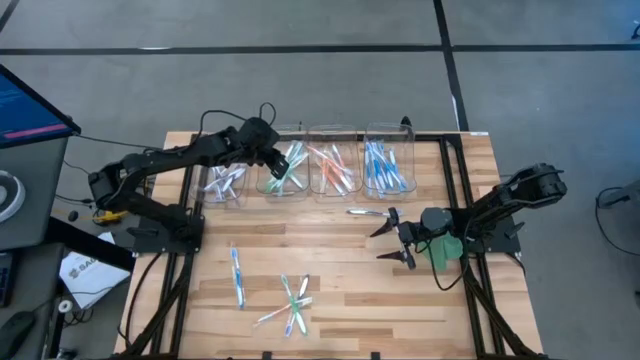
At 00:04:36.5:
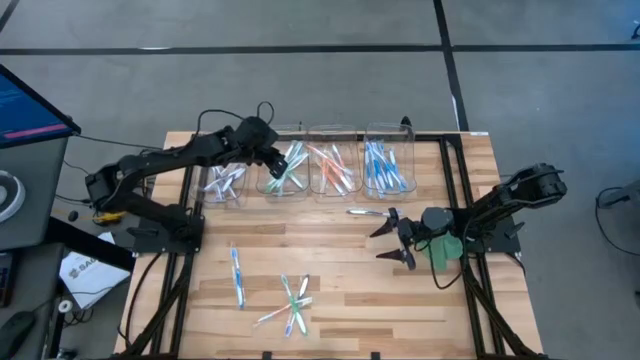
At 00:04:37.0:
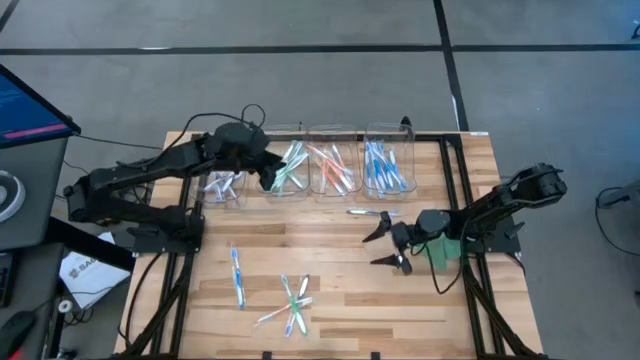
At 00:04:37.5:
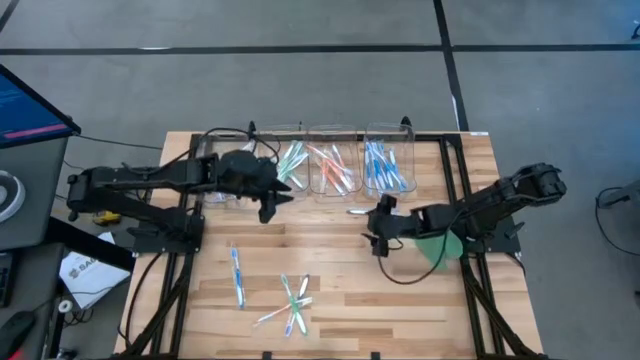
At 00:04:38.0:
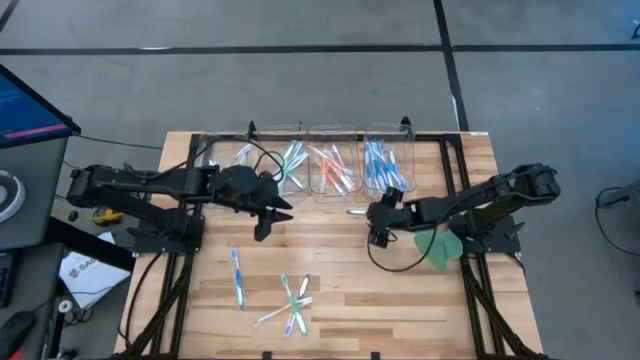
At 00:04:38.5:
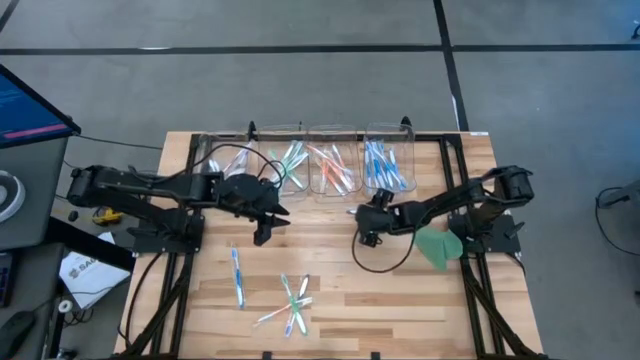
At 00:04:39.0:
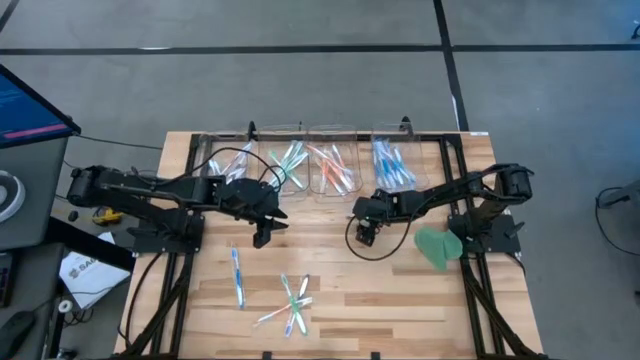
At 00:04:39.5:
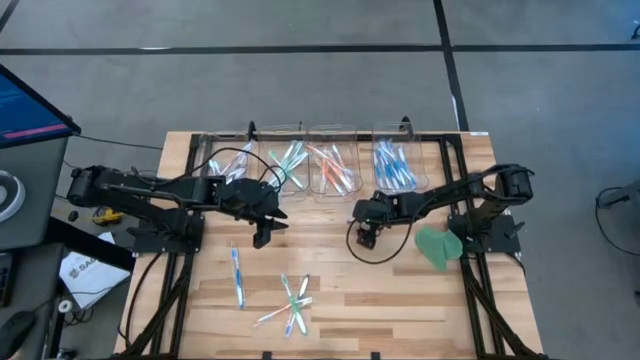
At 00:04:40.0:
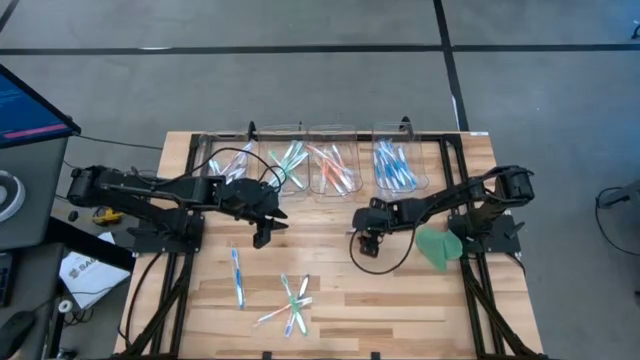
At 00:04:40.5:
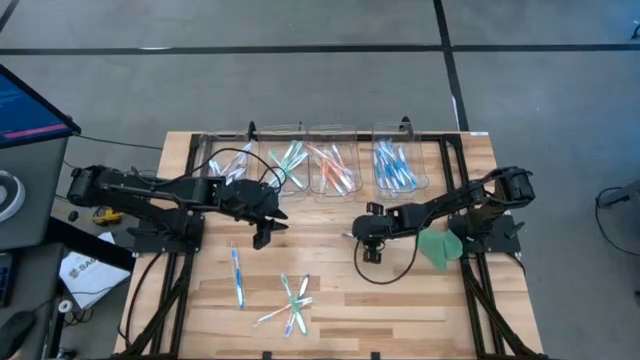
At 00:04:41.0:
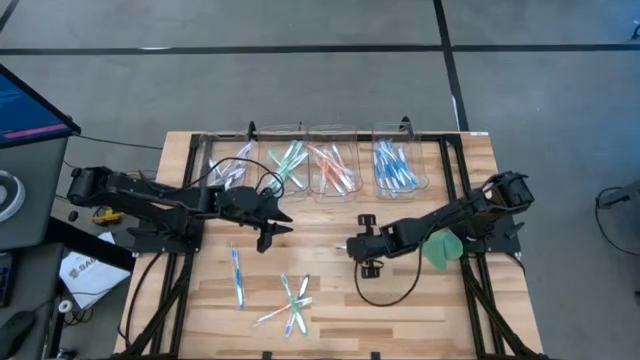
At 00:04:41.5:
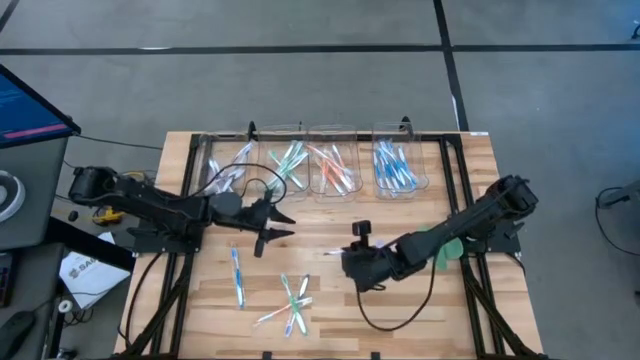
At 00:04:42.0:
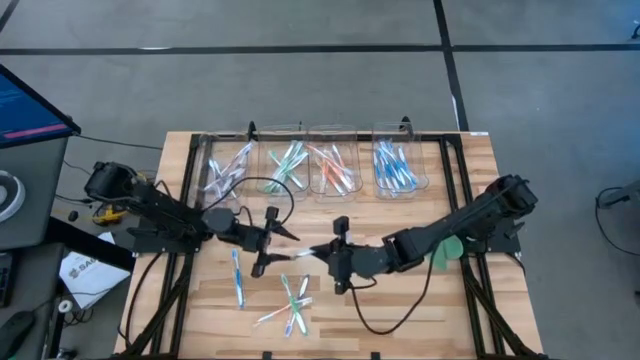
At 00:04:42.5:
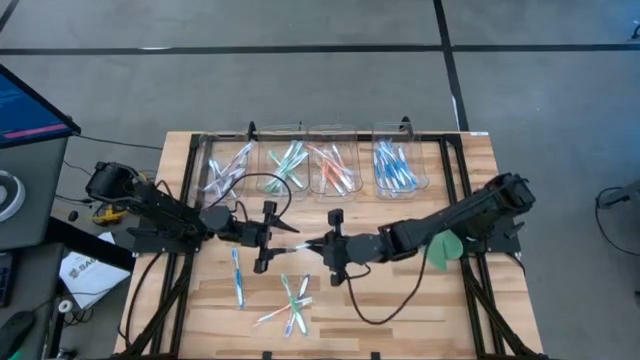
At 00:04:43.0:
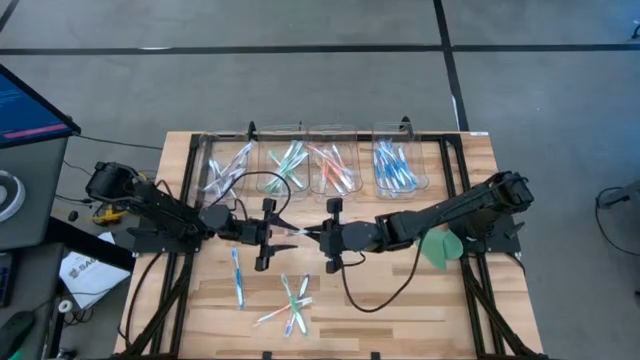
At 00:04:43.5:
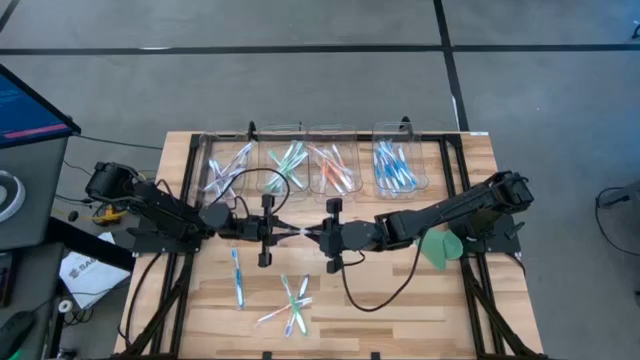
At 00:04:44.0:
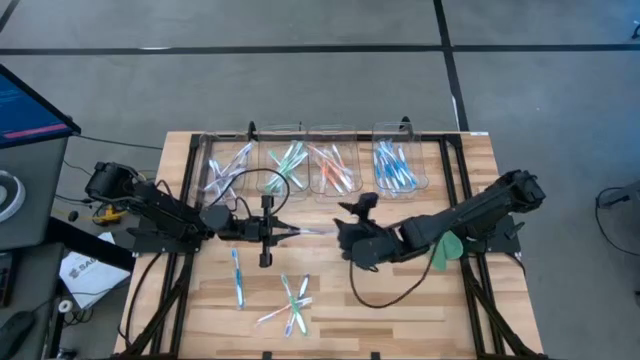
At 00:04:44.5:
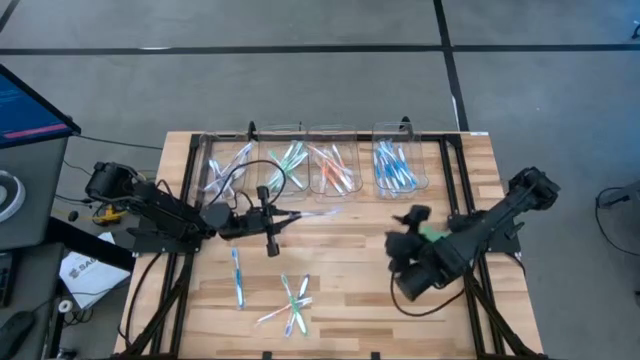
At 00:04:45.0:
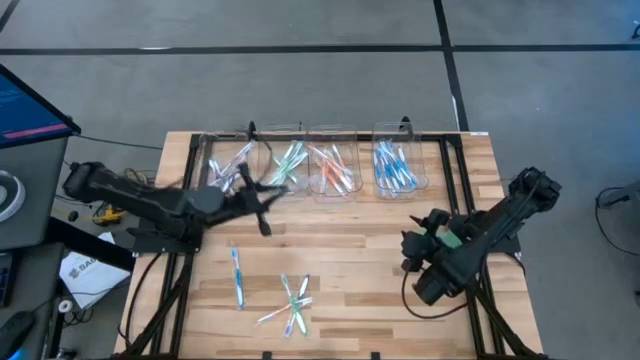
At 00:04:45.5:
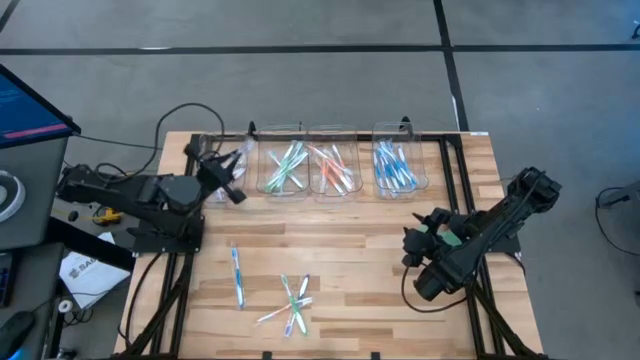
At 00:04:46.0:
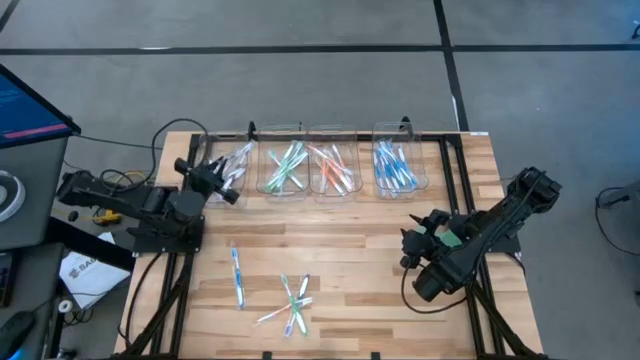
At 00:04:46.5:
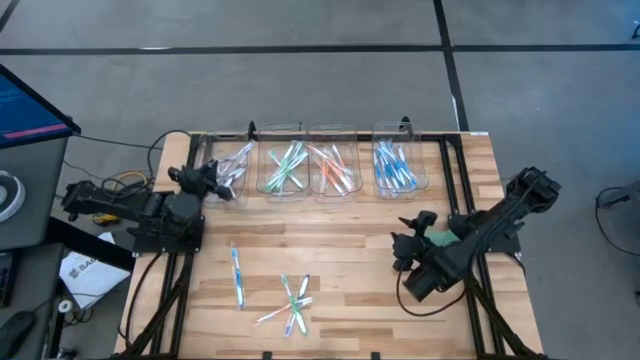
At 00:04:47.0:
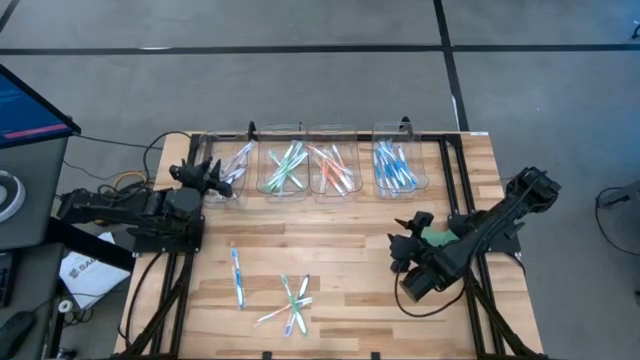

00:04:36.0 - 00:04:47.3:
Task: Pick & Place Toothbrushes
Put the violet toothbrush into the left transparent bin

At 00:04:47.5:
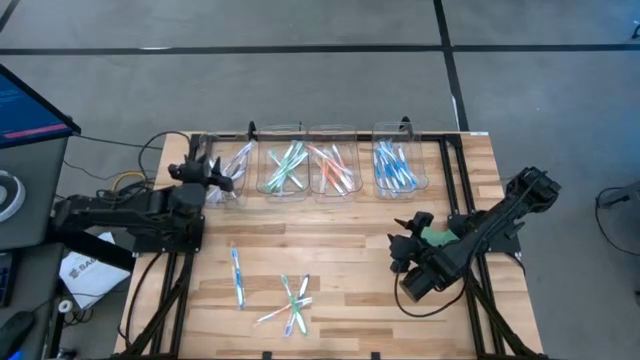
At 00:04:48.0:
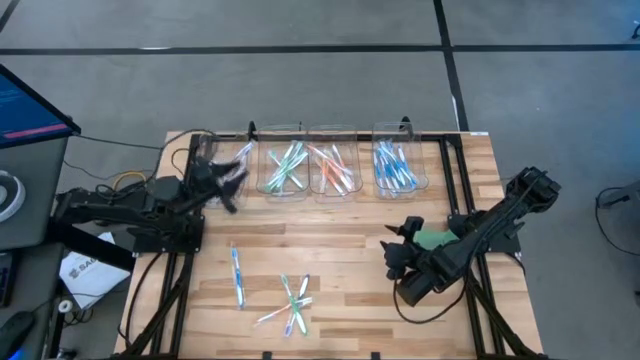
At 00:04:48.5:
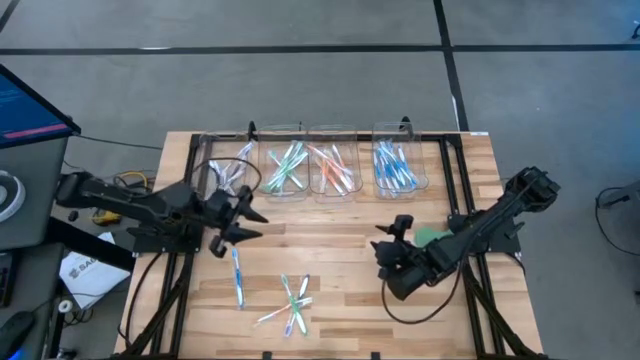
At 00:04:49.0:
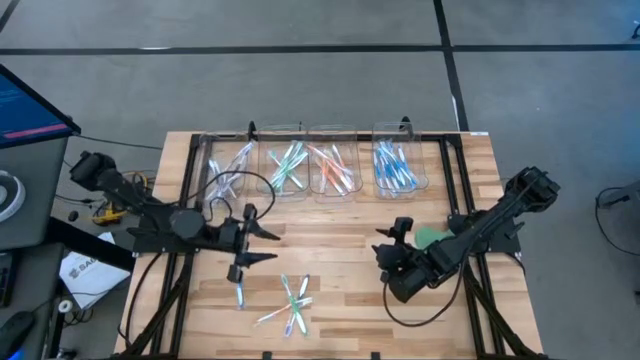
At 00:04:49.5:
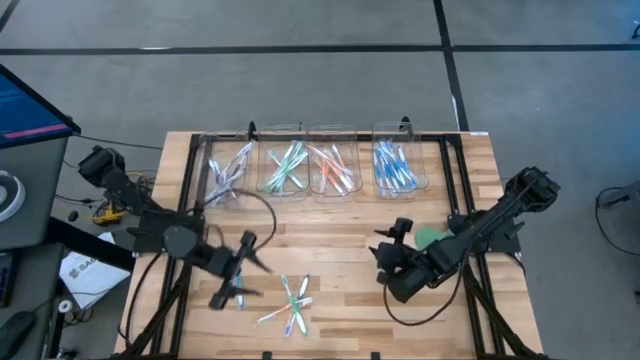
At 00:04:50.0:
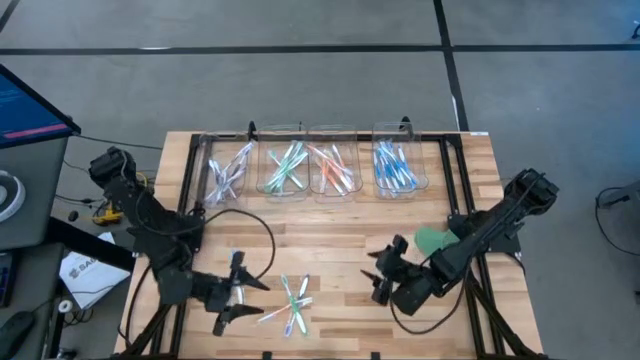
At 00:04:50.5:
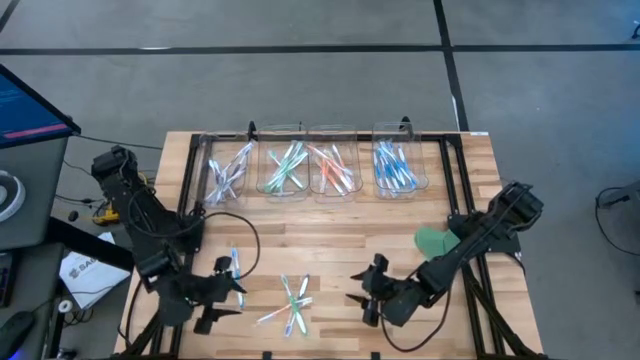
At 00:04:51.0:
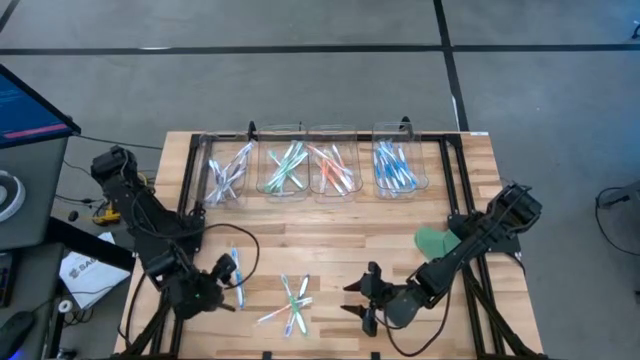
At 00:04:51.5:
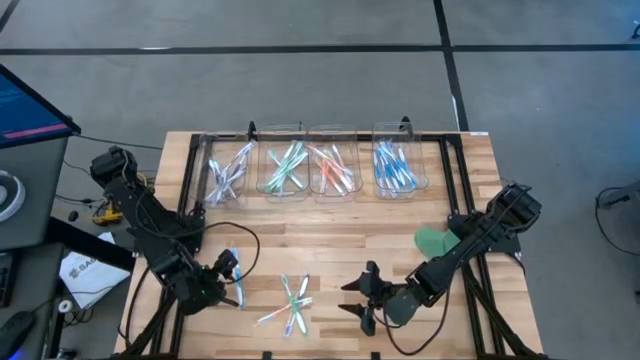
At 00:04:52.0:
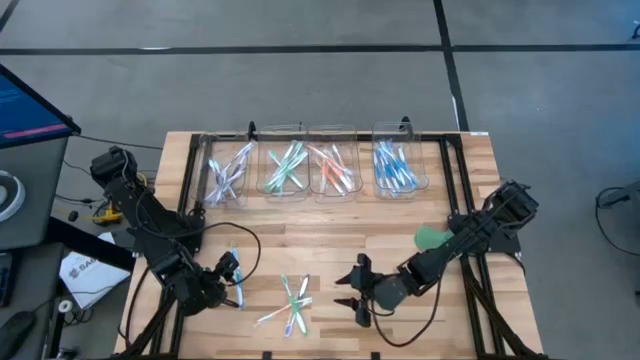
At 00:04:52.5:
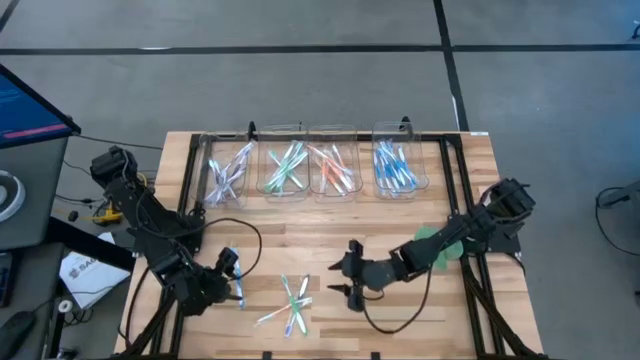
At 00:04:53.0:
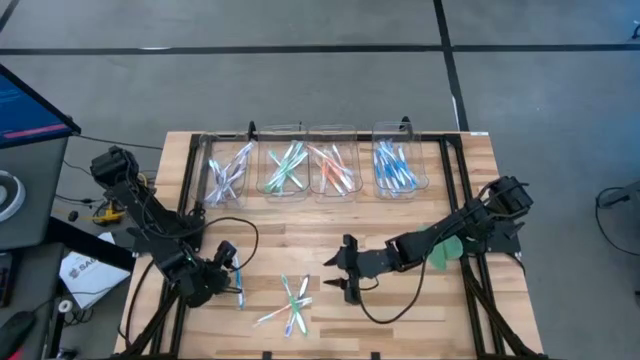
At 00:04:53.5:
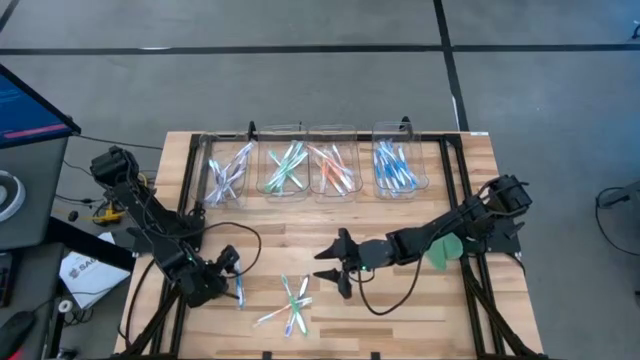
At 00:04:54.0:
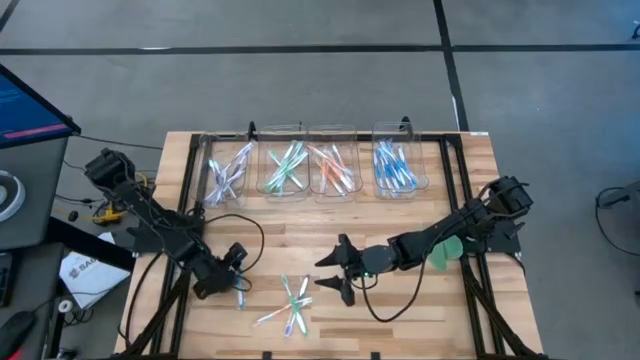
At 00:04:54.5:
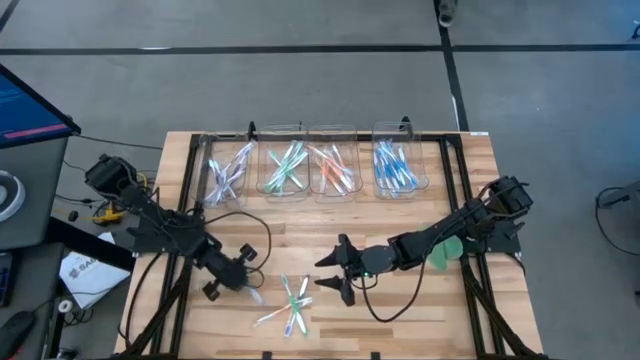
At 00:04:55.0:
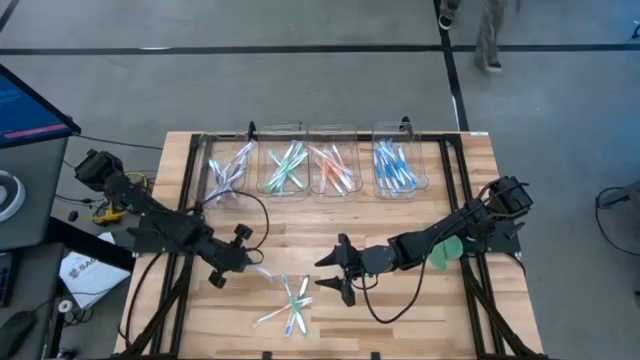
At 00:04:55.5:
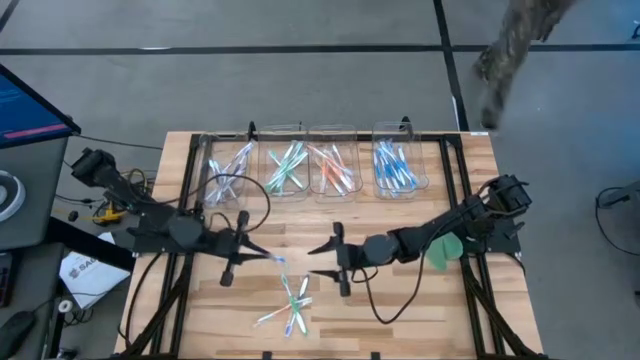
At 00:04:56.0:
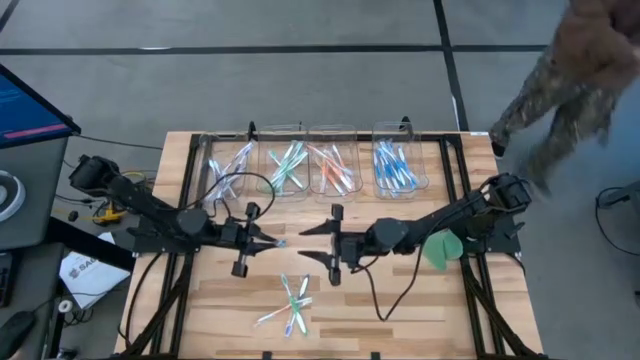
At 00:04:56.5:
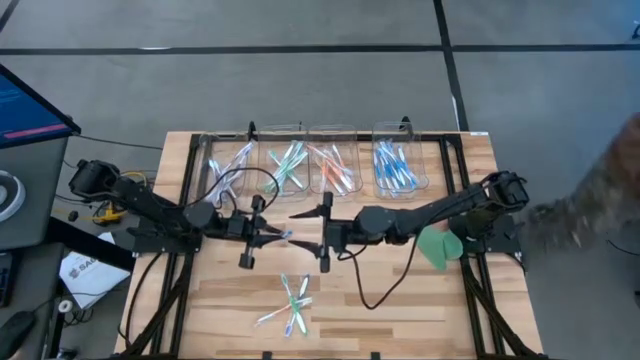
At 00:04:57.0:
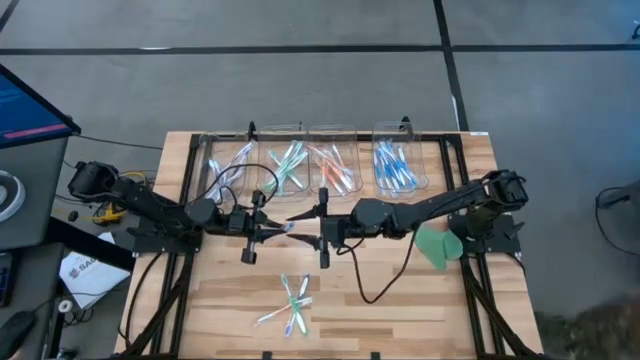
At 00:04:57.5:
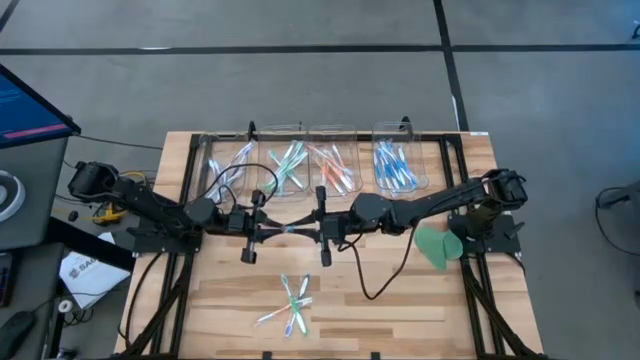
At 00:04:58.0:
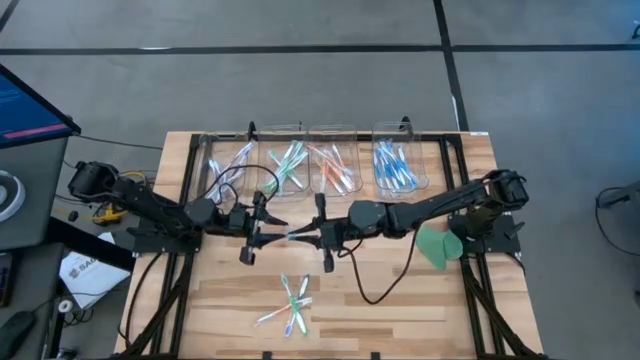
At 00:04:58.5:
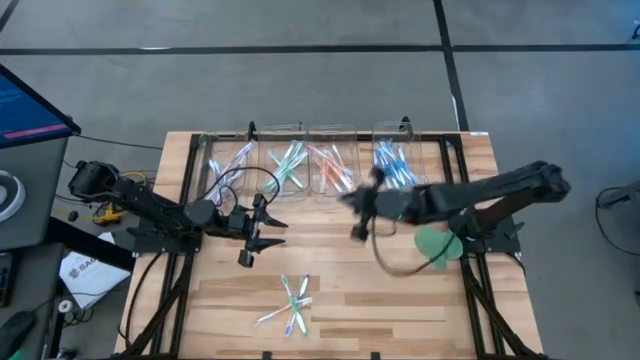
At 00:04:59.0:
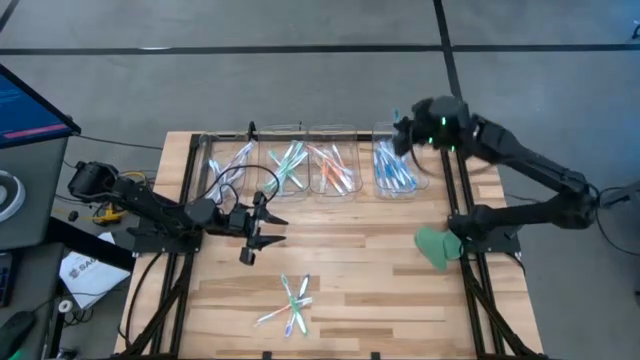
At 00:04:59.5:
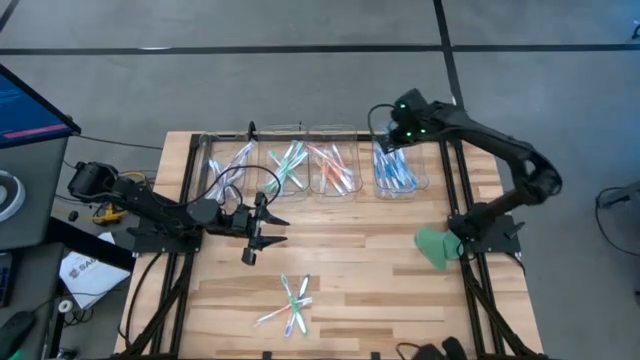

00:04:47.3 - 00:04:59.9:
Put the blue toothbrush into the right transparent bin
